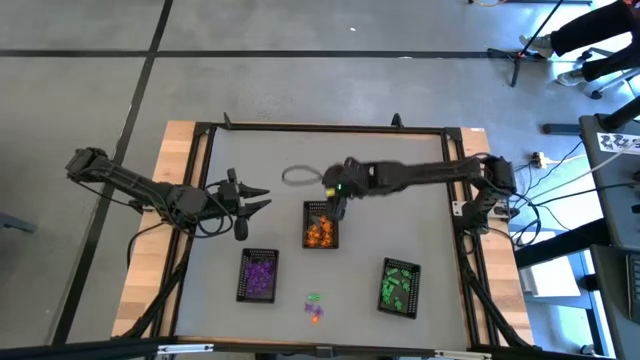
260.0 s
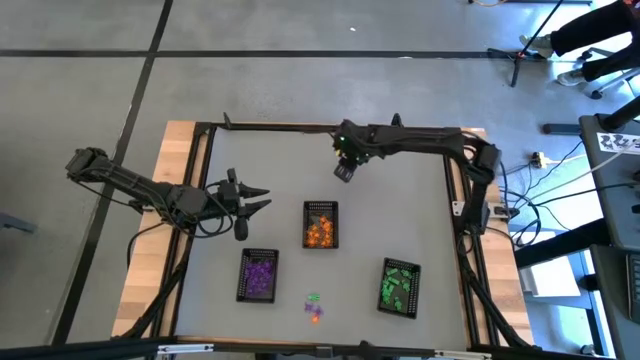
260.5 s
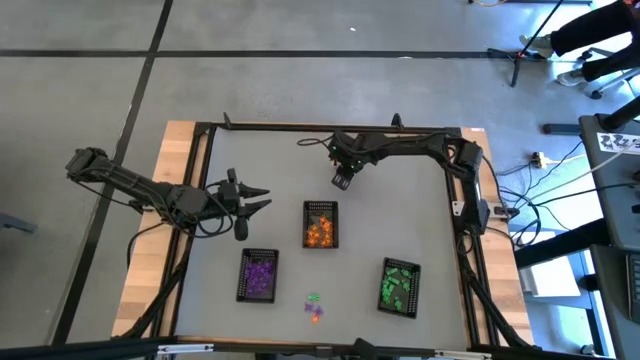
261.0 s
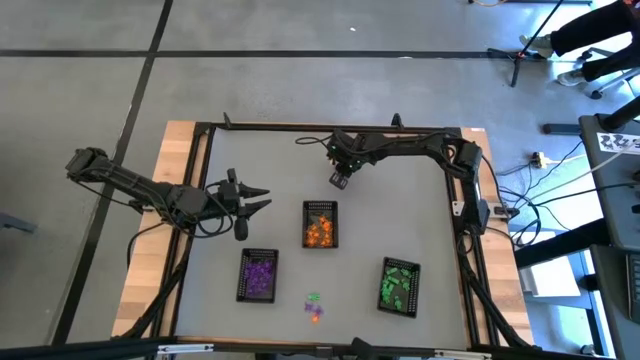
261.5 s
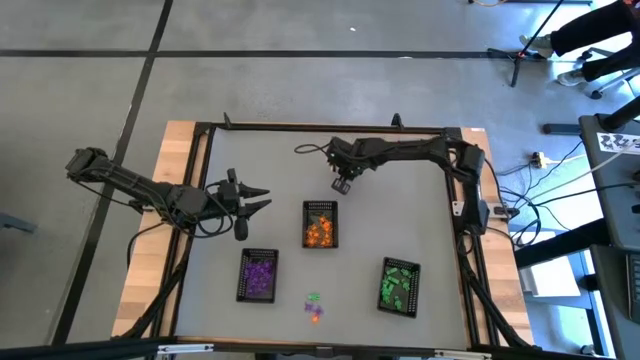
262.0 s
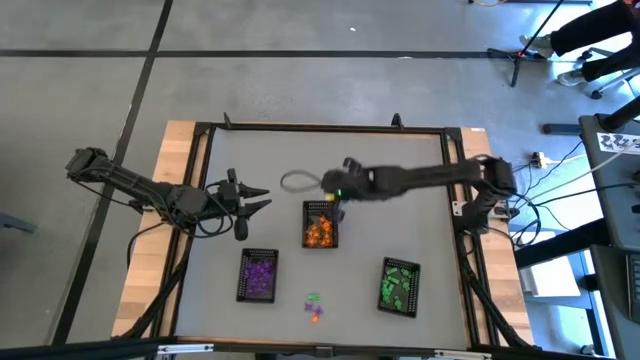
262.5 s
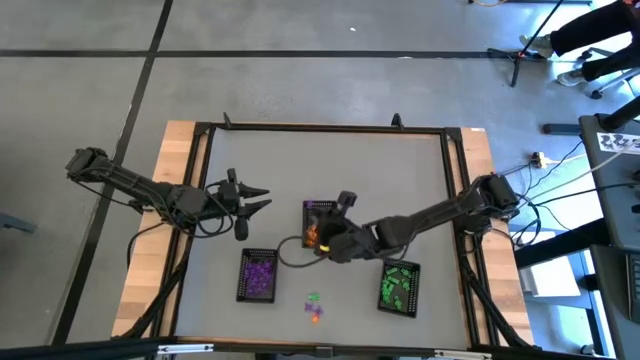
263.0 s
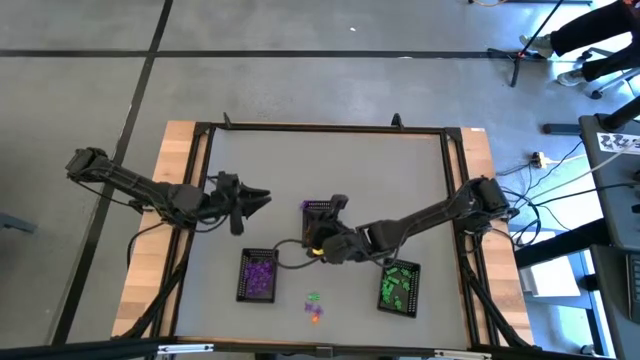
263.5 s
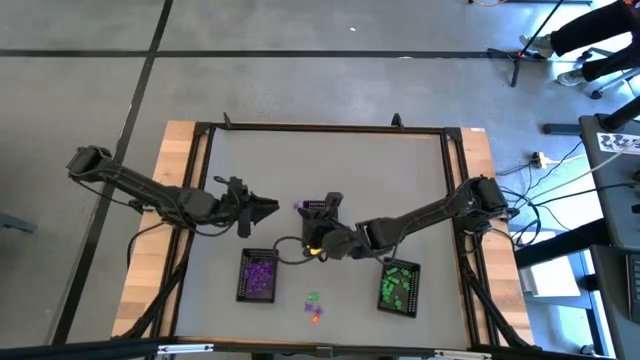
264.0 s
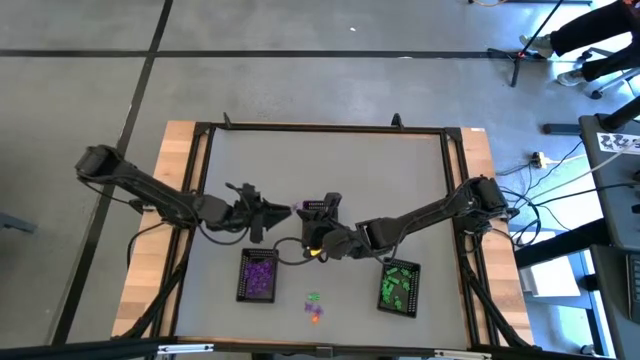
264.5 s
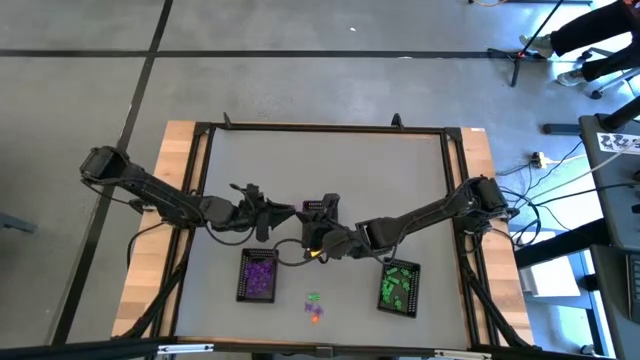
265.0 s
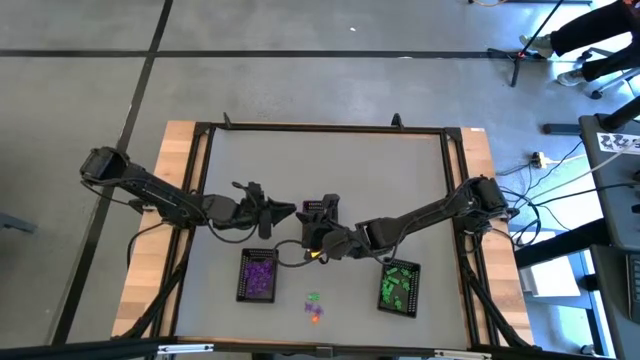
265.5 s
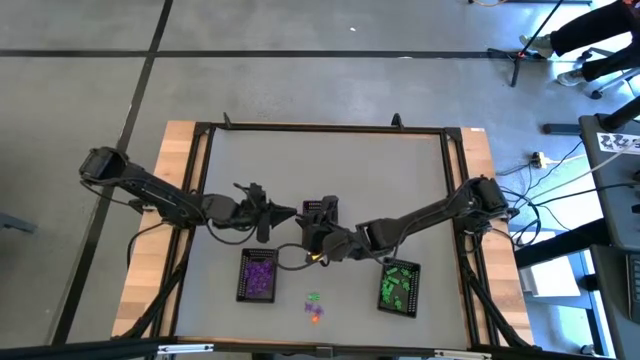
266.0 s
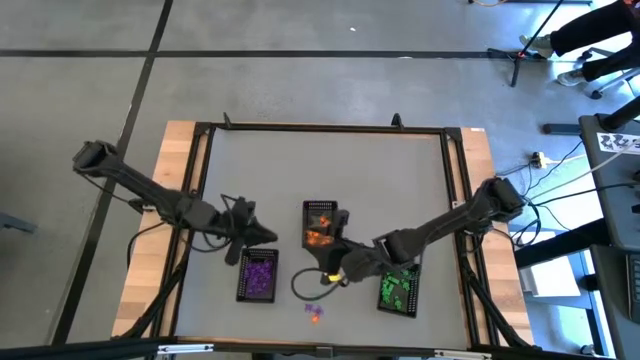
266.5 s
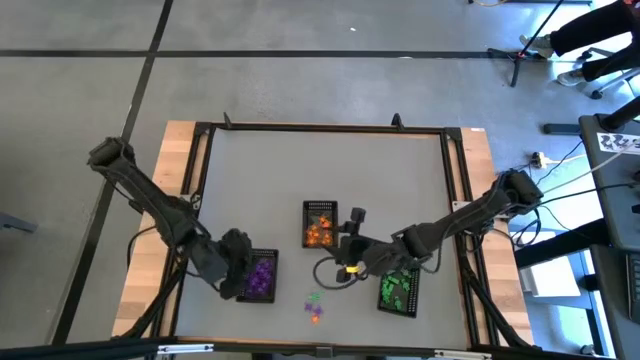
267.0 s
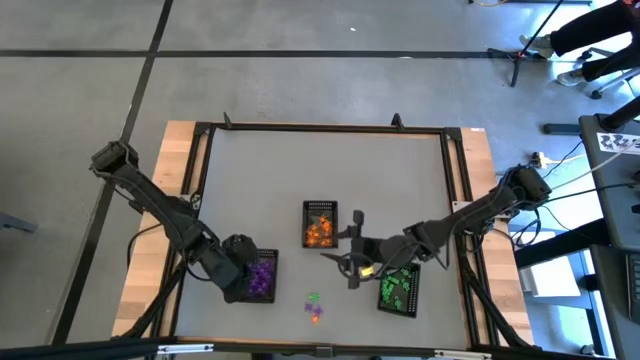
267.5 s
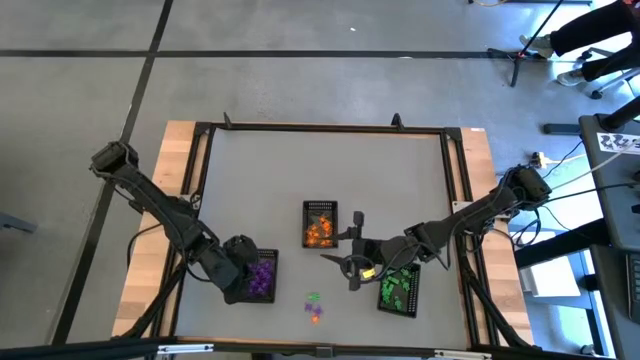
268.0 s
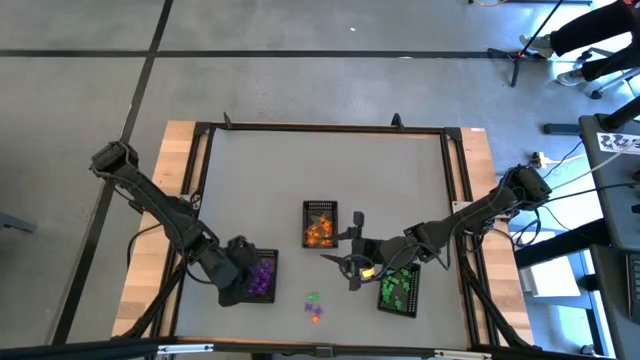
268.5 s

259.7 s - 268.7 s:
Task: Sort Halloween decoration
Put the violet spider toy into the bottom left black bin

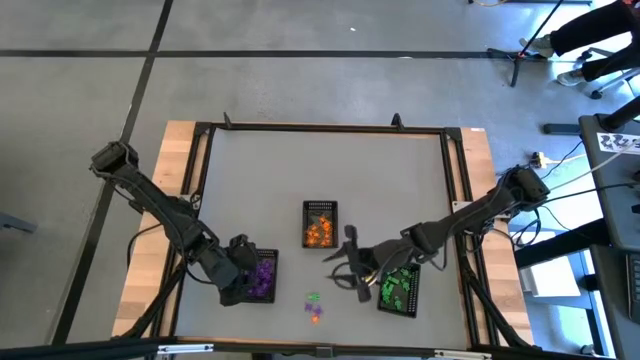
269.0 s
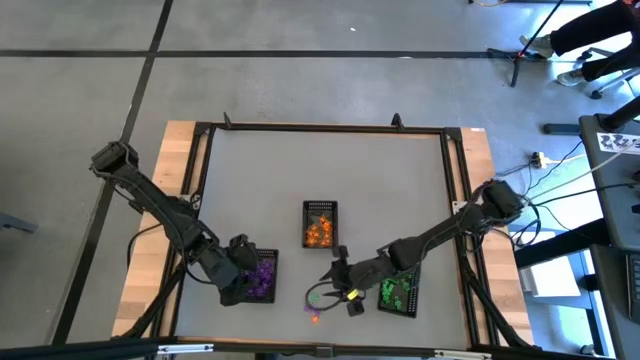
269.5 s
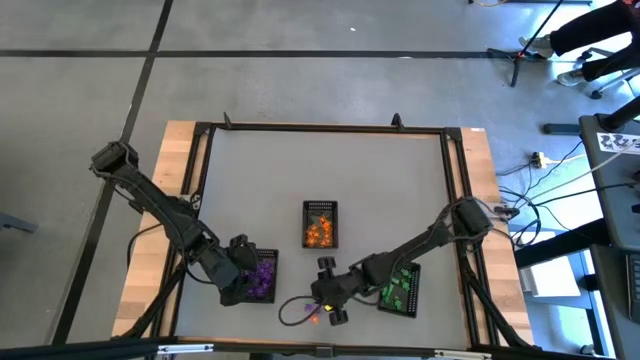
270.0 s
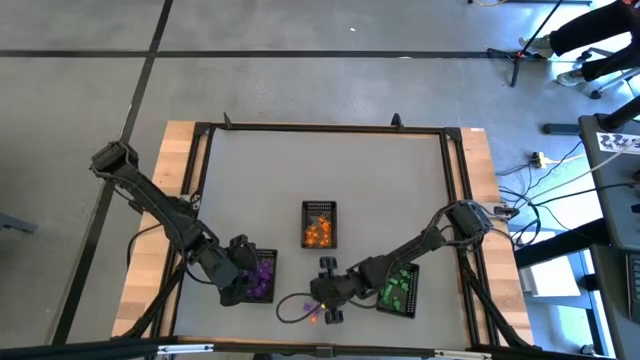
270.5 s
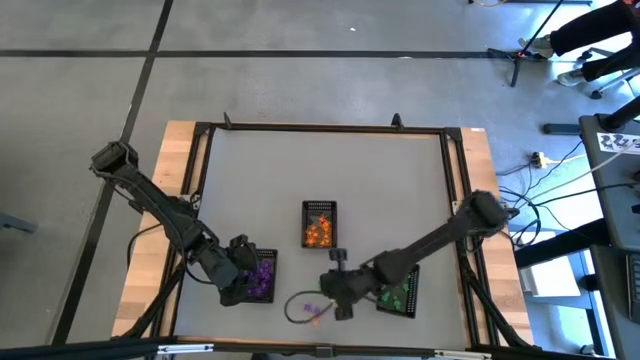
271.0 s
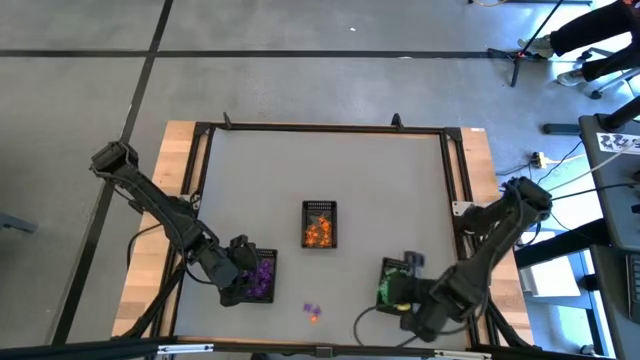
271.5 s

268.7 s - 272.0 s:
Put the green skeleton toy into the bottom right black bin

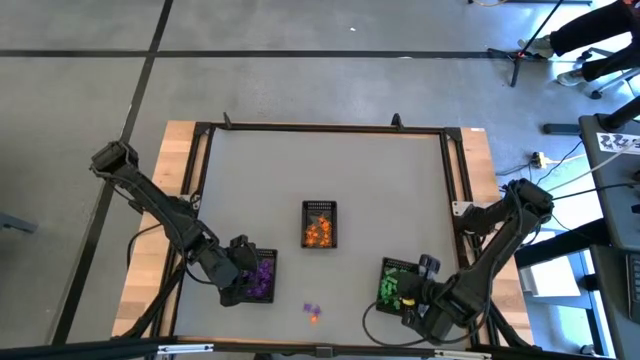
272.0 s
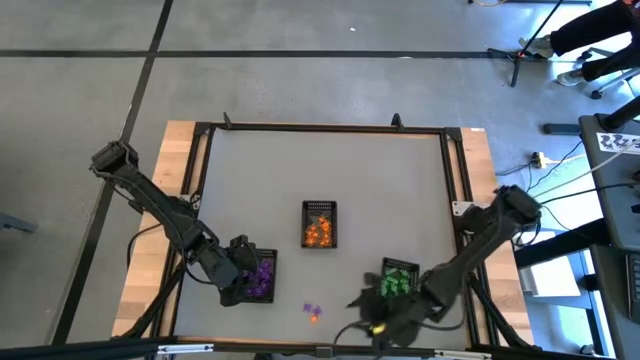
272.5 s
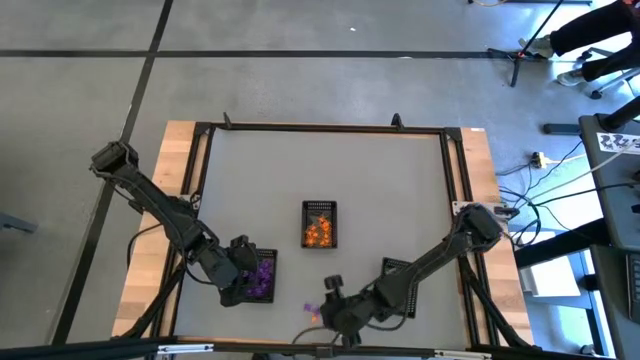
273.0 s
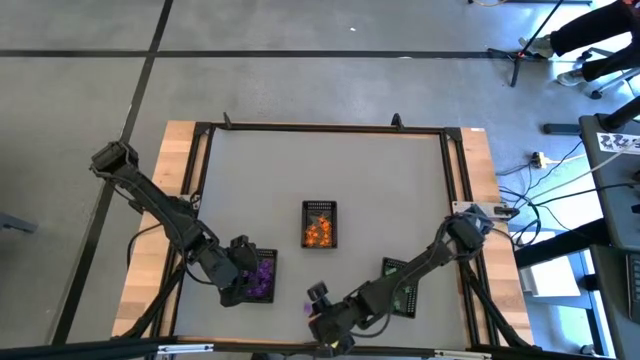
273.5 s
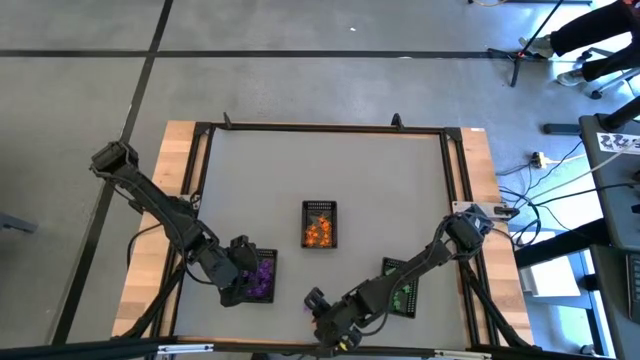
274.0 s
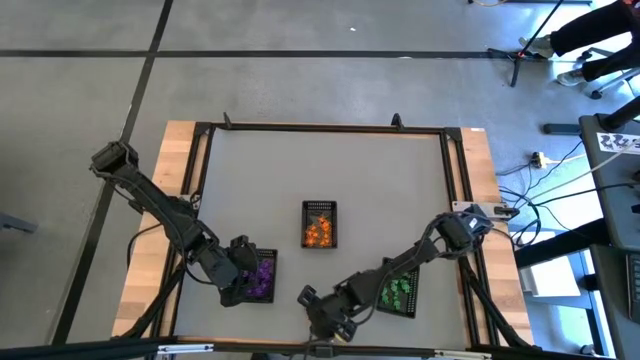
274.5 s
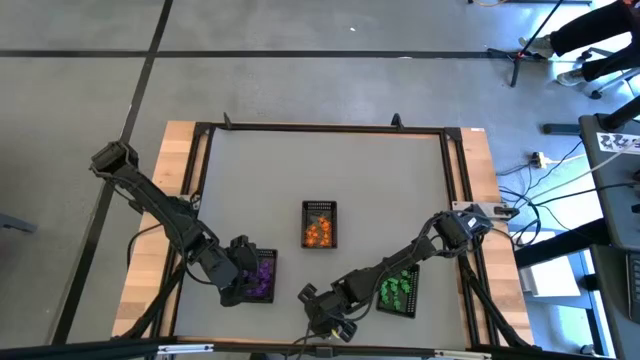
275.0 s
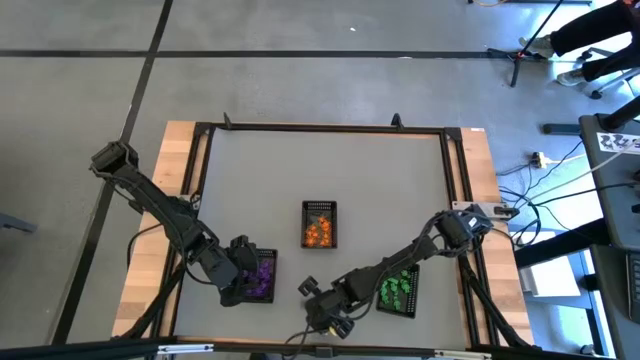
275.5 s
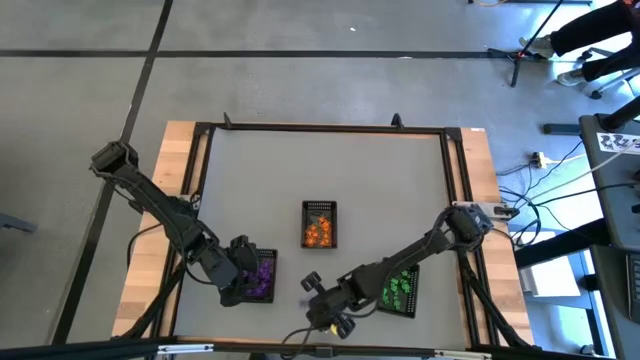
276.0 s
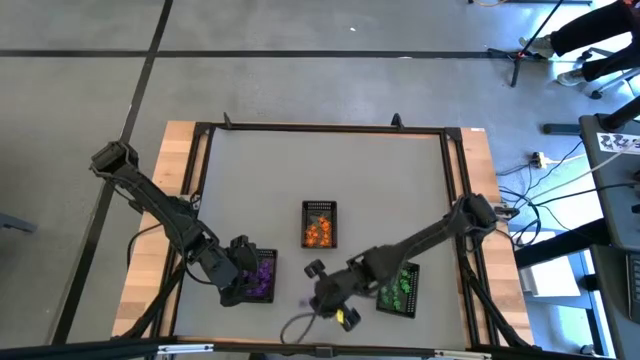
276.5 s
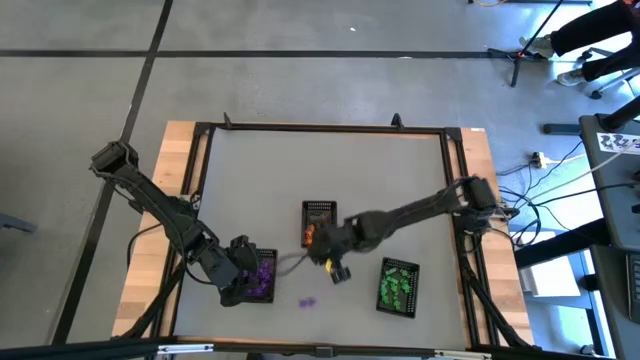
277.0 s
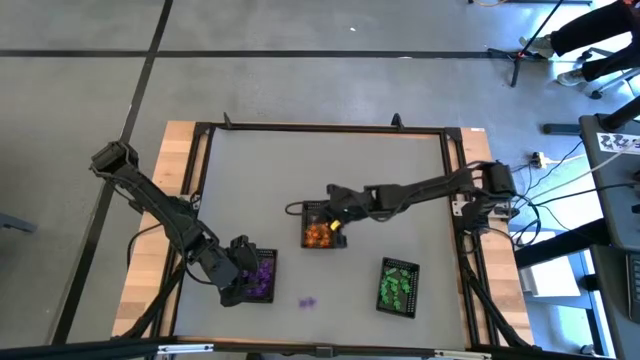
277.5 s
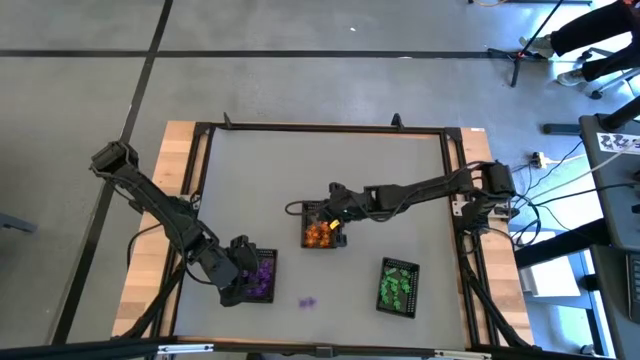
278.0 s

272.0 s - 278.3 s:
Put the orange spider toy into the top black bin

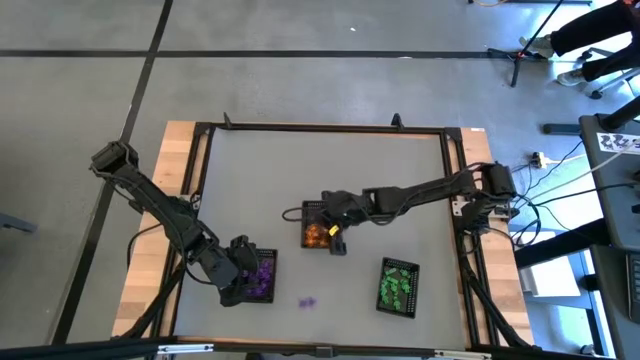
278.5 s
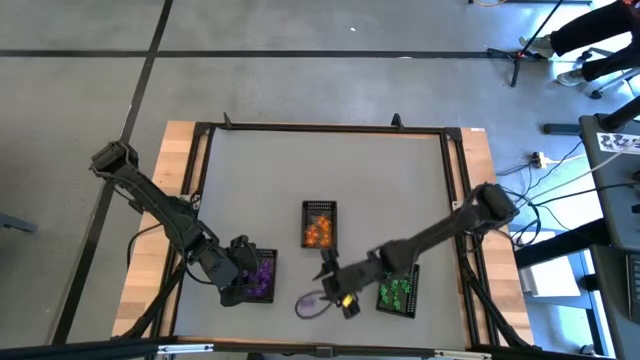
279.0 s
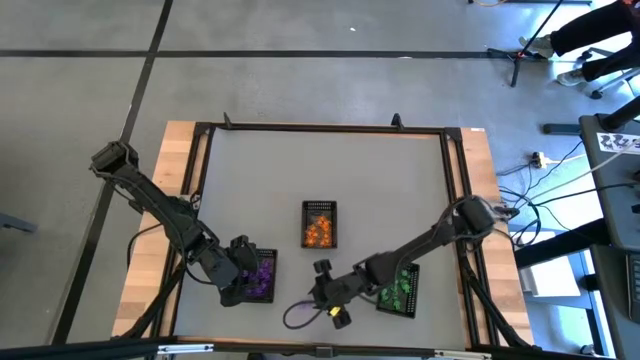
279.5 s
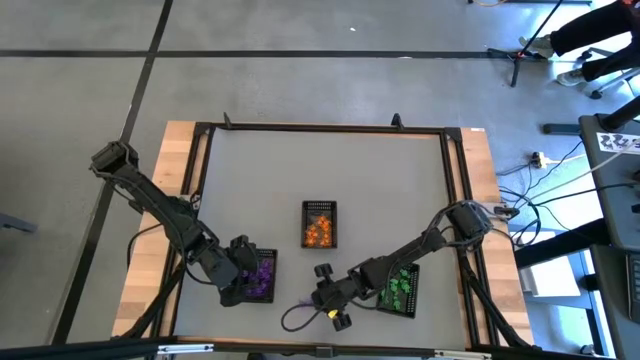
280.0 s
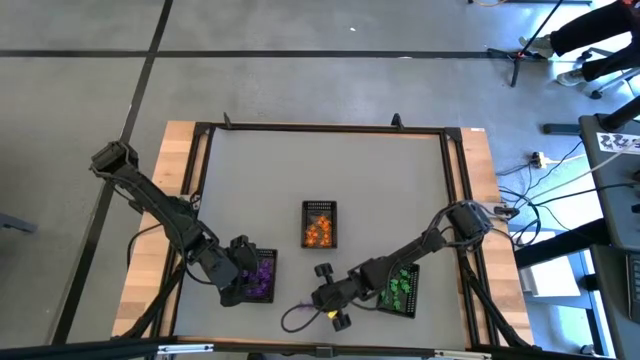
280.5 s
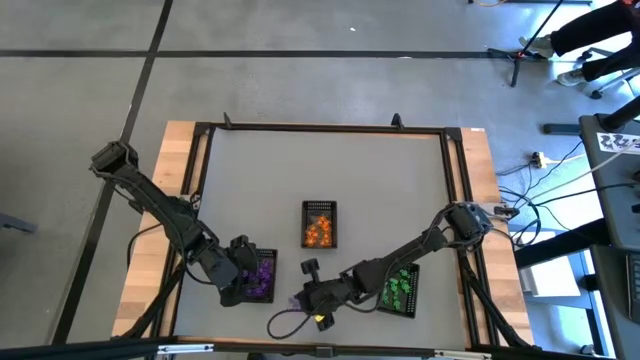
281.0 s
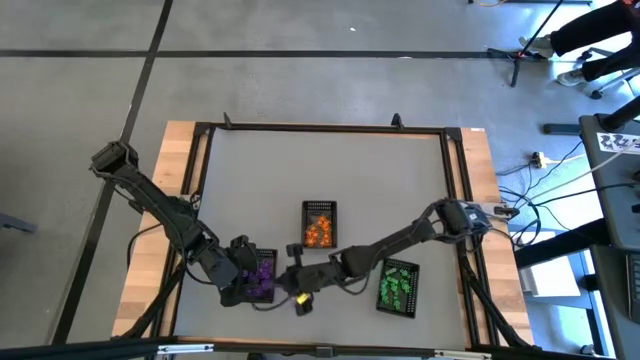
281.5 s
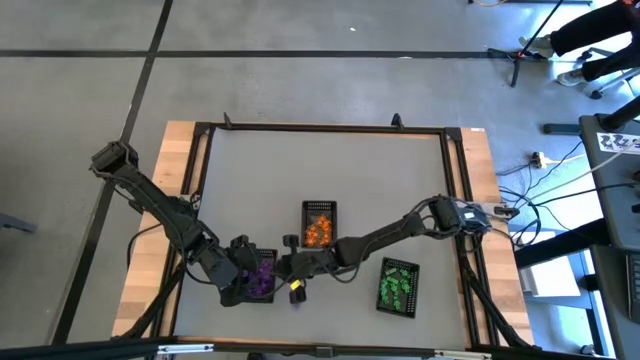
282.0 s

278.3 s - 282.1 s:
Put the violet spider toy into the bottom left black bin
